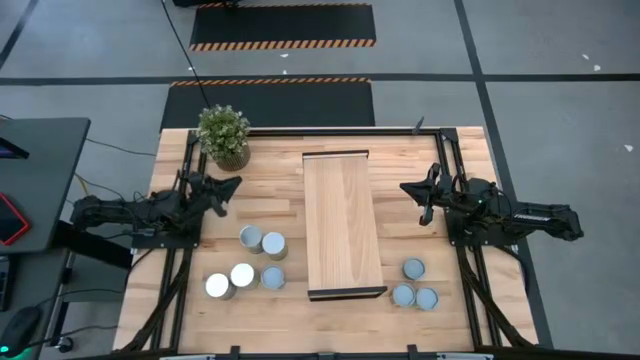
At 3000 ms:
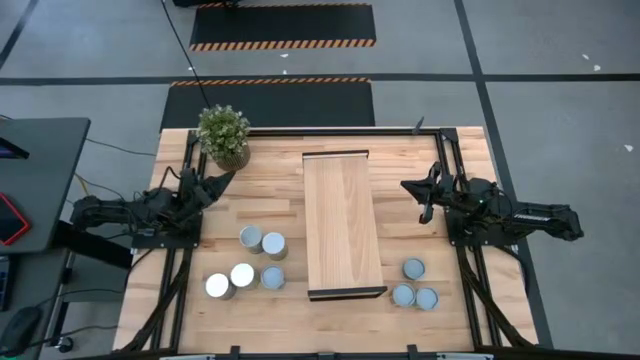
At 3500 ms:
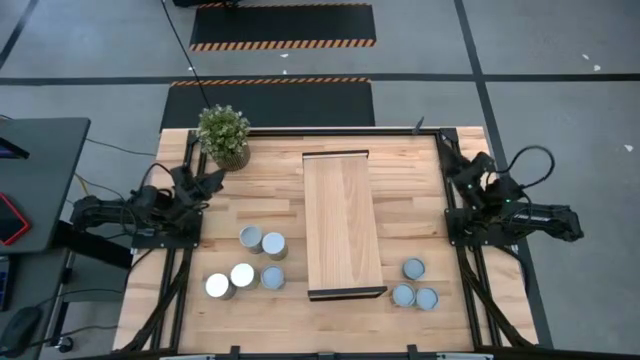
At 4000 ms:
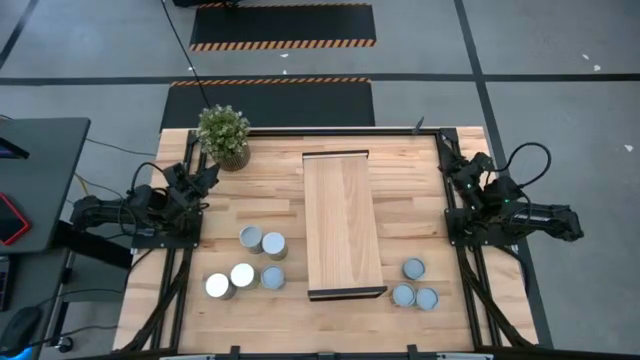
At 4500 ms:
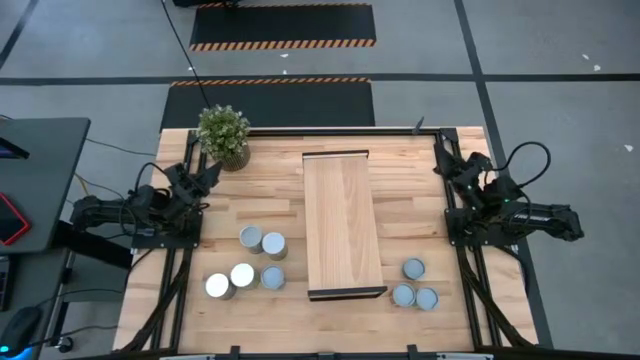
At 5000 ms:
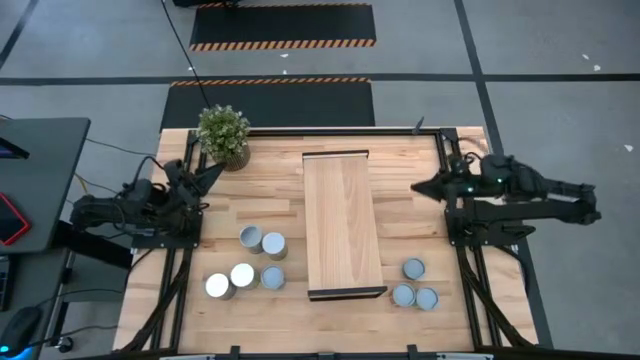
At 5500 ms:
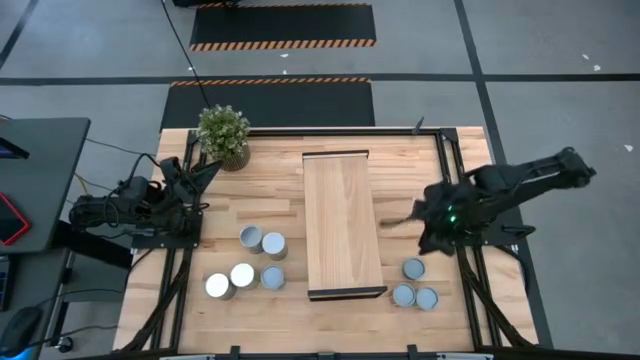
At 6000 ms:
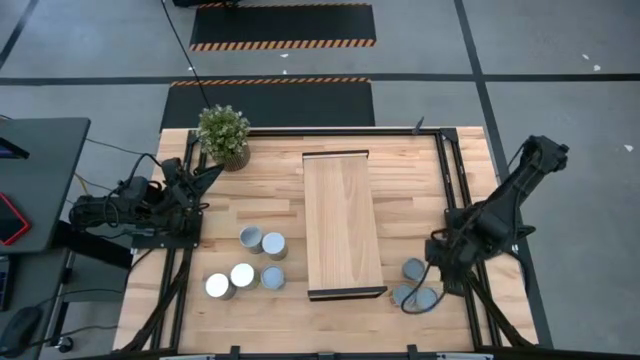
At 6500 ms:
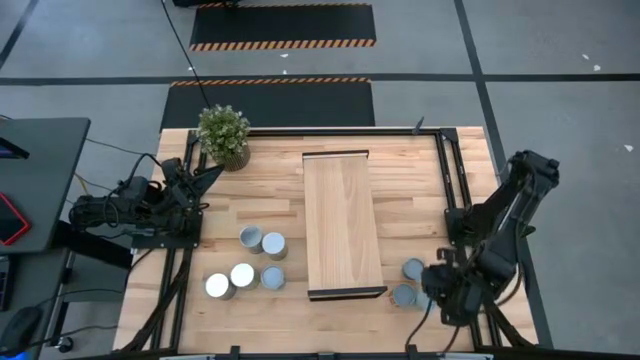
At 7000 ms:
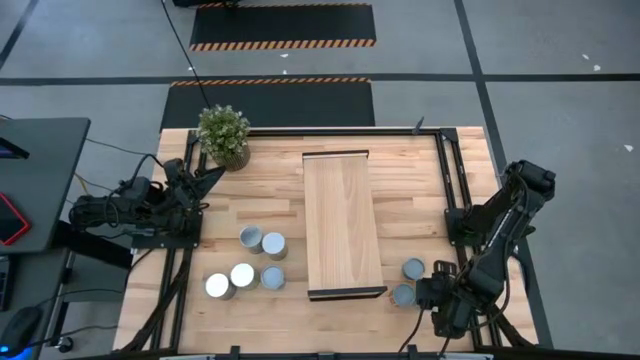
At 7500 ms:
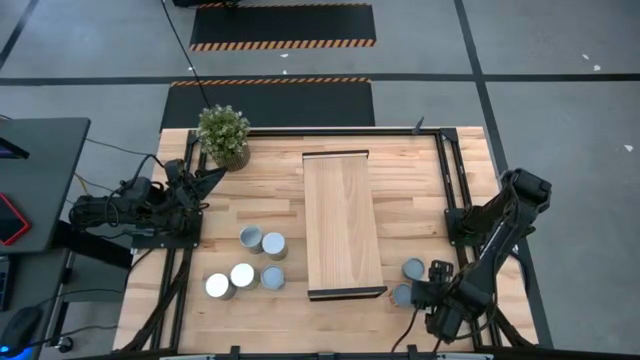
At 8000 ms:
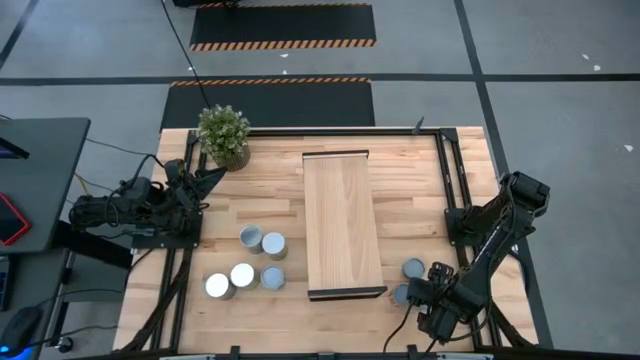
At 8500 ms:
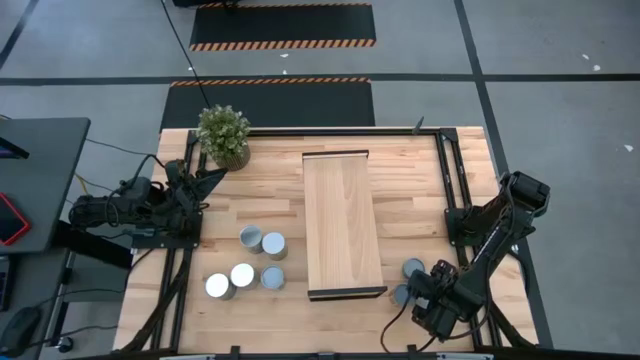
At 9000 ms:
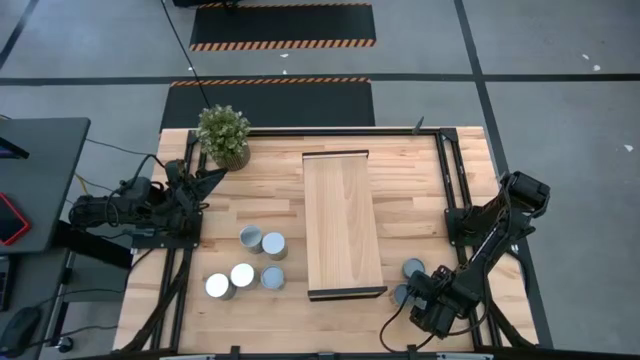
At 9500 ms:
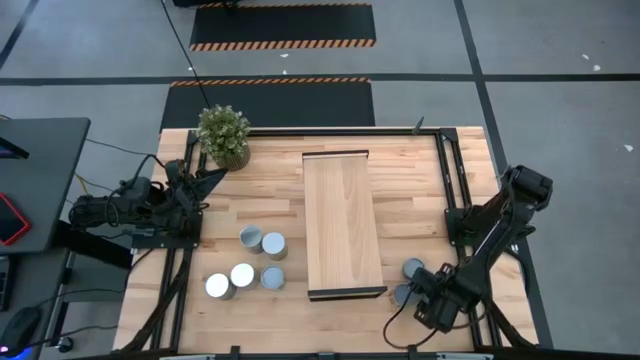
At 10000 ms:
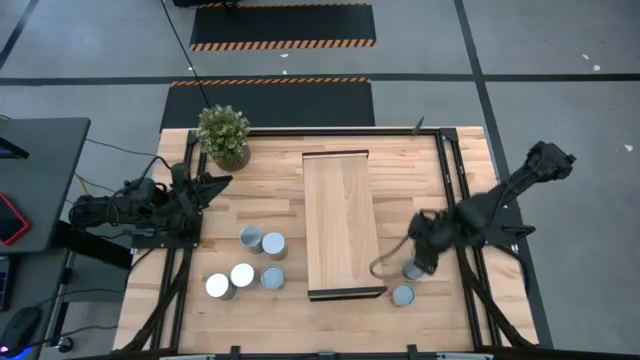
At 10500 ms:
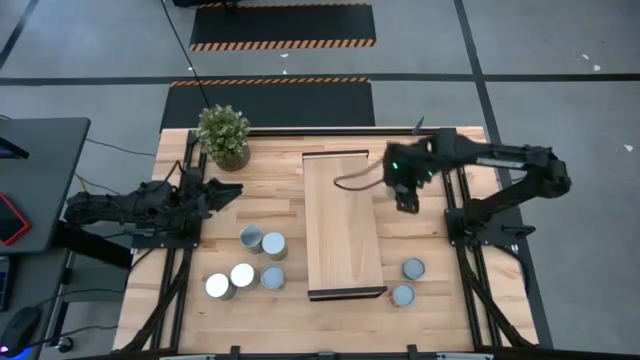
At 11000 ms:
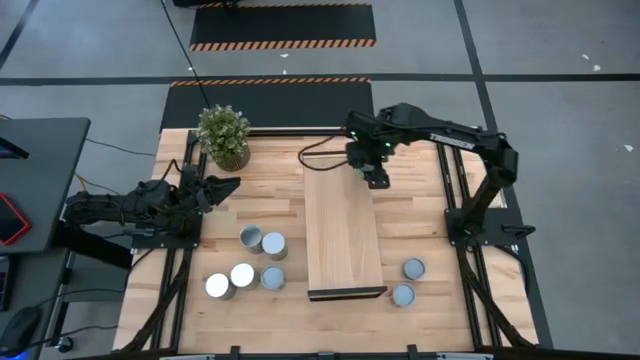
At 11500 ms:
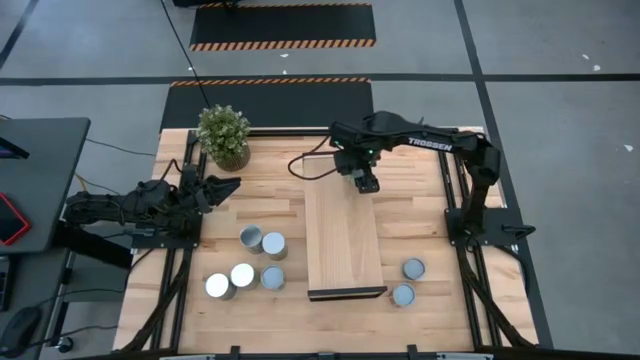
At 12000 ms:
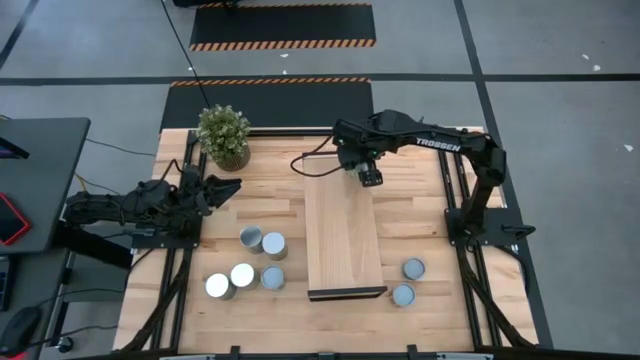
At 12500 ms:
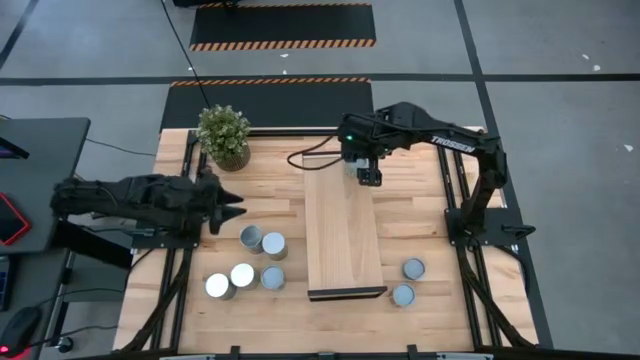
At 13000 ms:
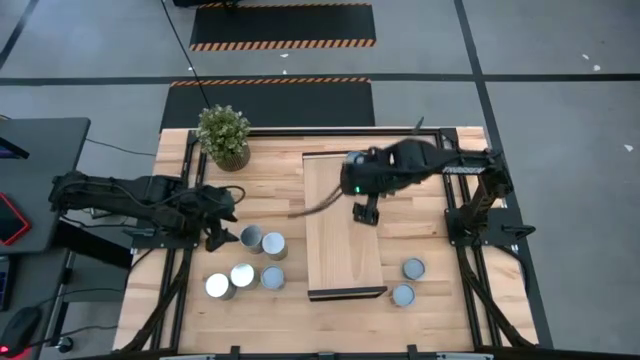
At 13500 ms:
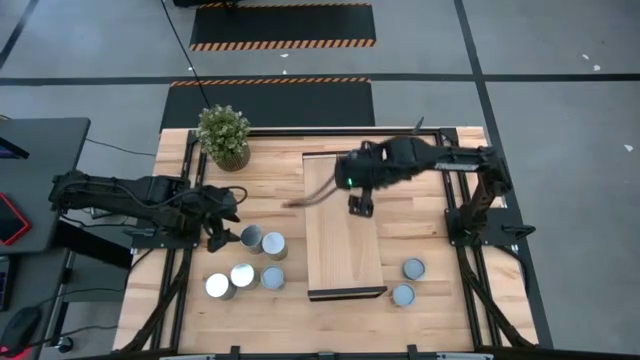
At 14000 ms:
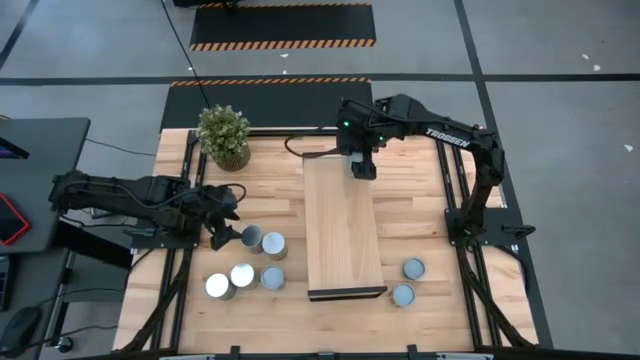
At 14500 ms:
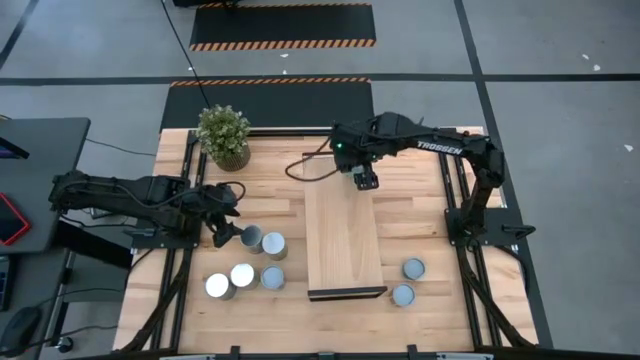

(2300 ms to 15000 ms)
Task: Pick and place cans onto a shelf
Put the canned peas on the shelf

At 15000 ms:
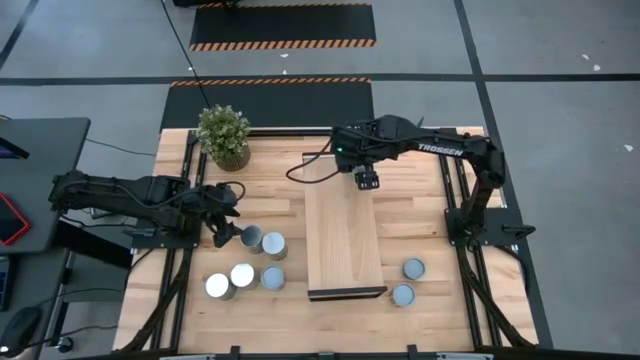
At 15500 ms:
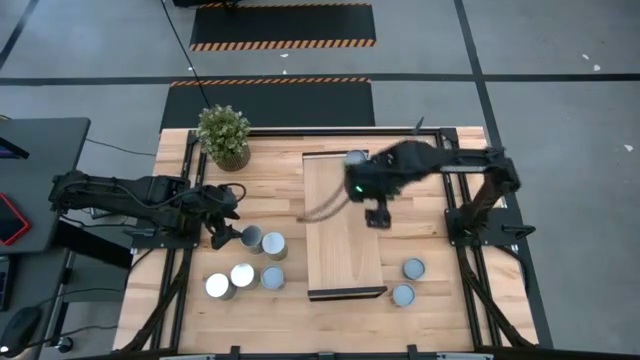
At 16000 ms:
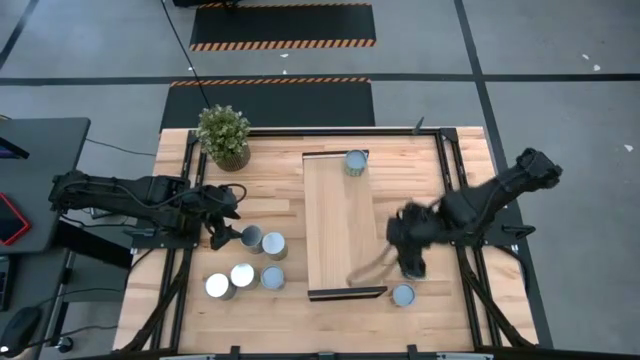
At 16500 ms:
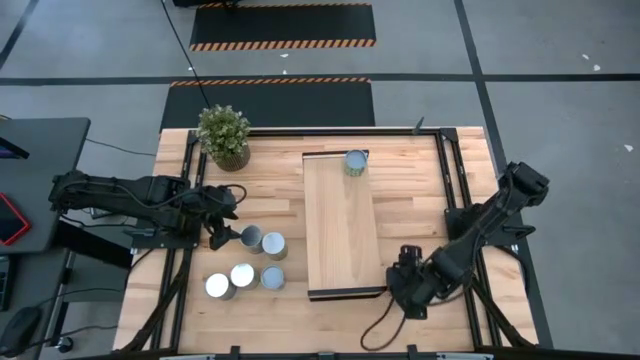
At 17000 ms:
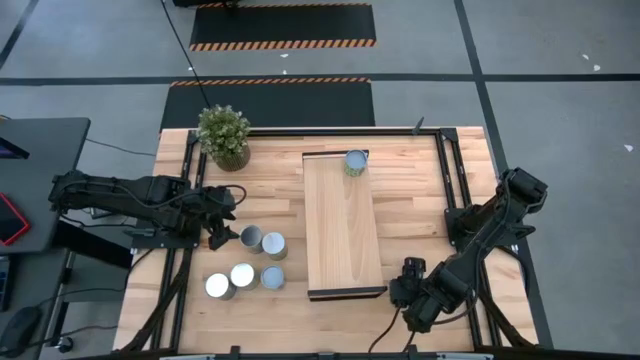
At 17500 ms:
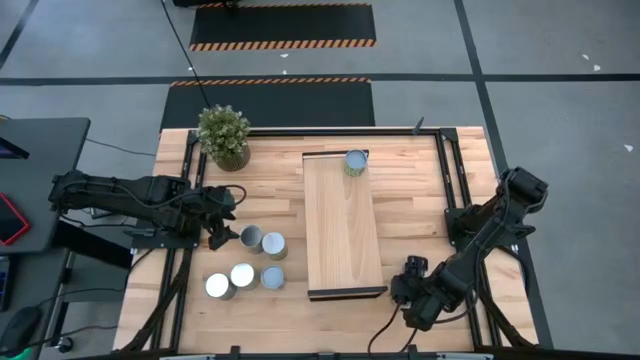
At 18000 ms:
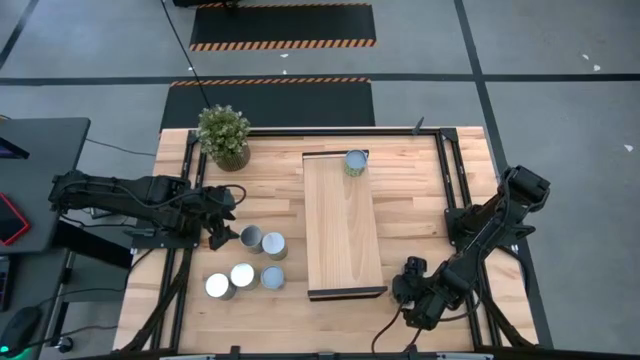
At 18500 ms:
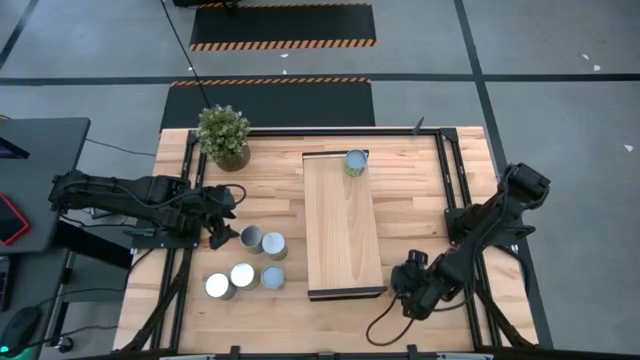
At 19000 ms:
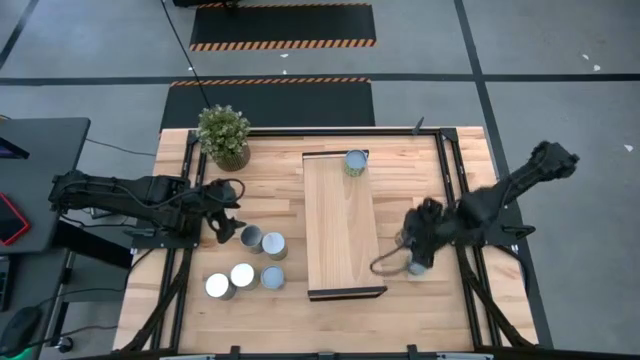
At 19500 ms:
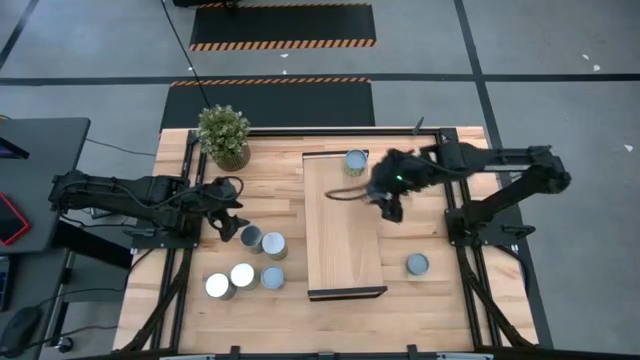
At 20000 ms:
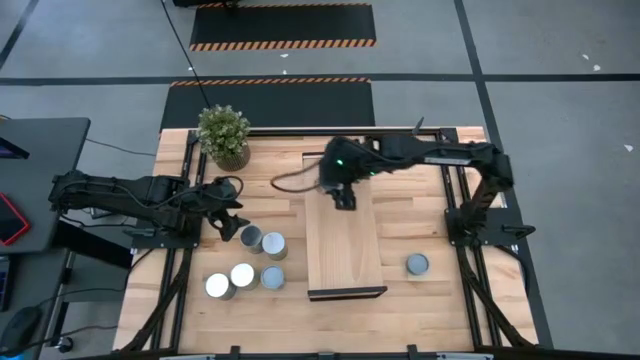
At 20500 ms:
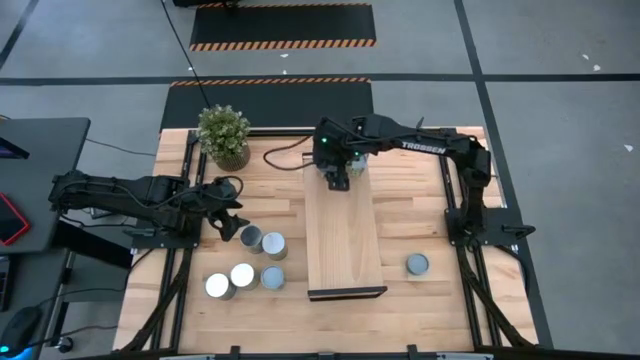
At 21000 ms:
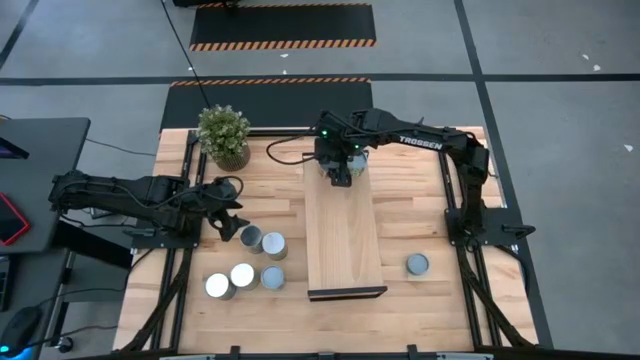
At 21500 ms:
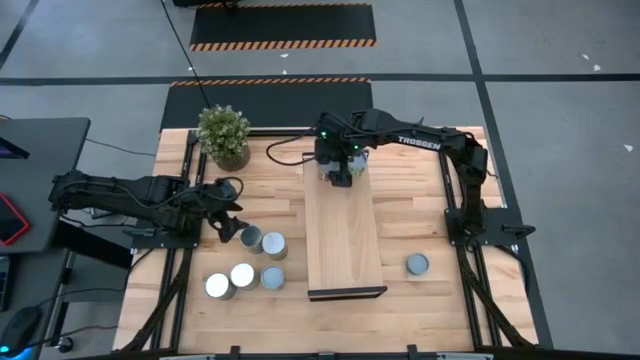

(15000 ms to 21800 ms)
Put the canned tomatoes on the shelf

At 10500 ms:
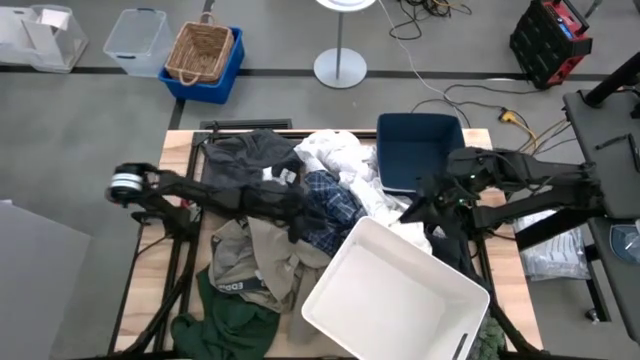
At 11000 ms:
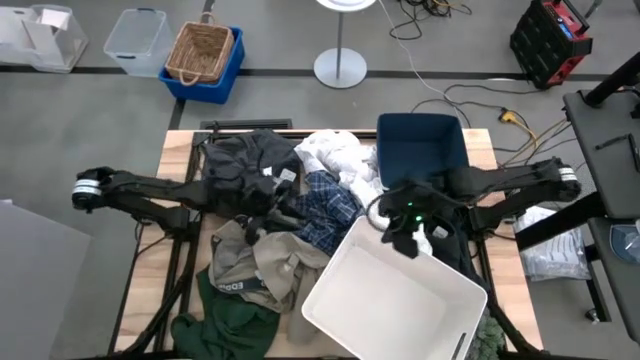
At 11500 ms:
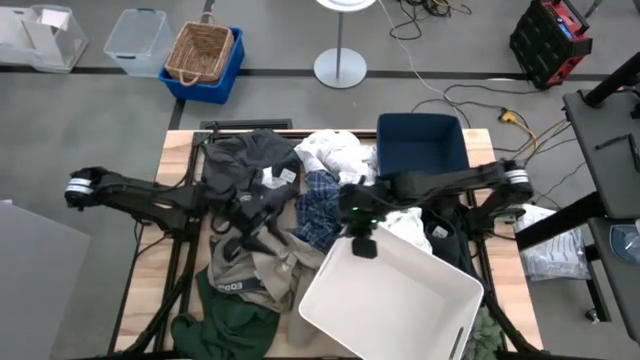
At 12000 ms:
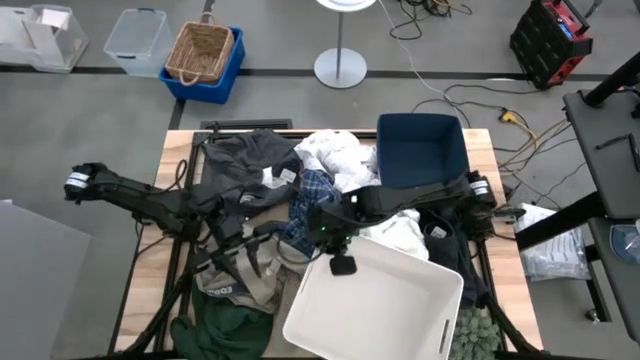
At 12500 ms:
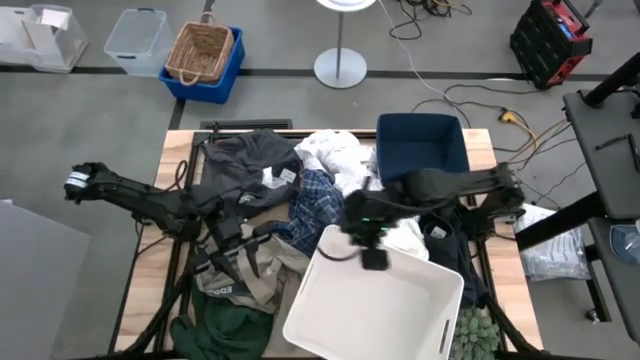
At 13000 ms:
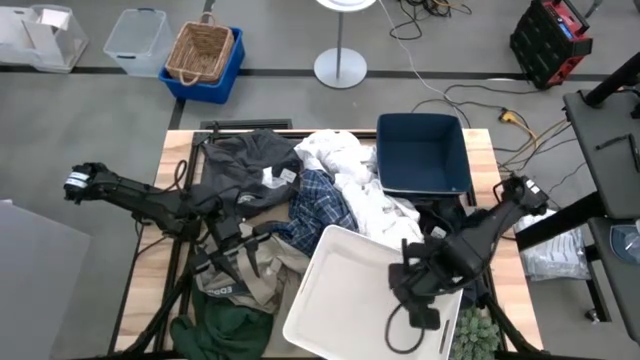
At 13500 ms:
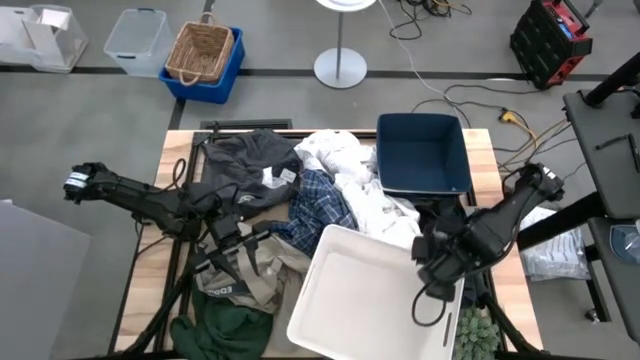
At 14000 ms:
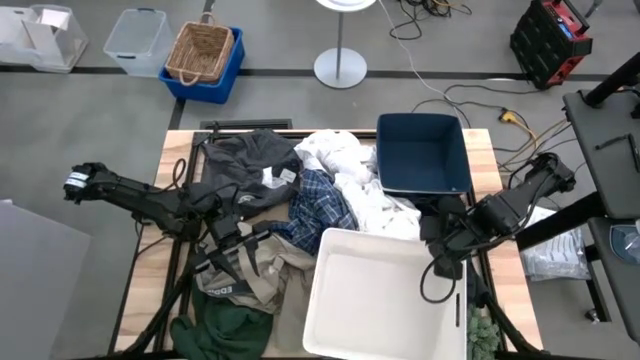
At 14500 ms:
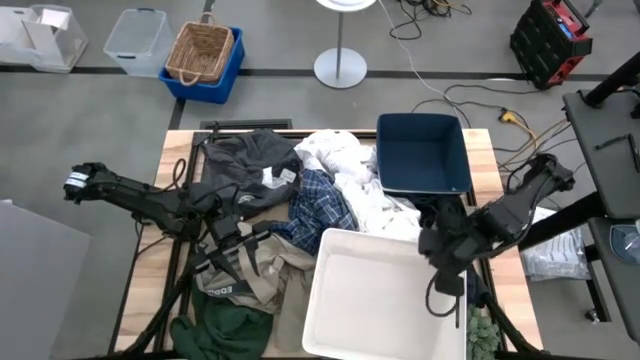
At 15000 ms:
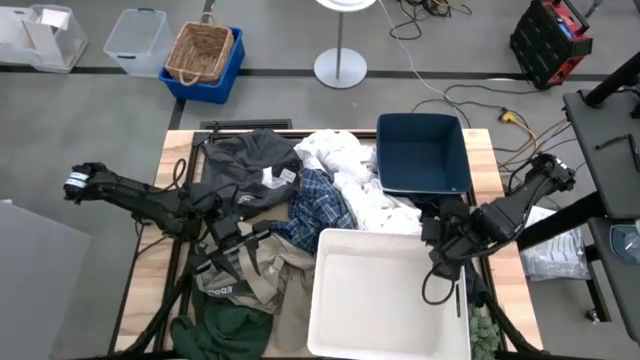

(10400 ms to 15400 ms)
Task: Sort clothes
Adjust the white bin
